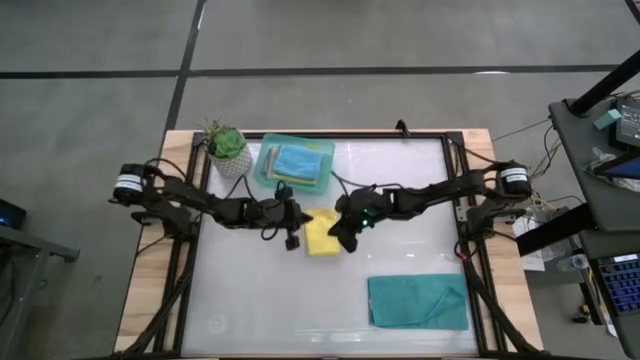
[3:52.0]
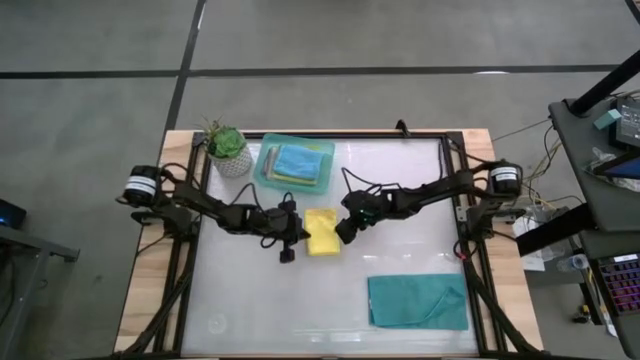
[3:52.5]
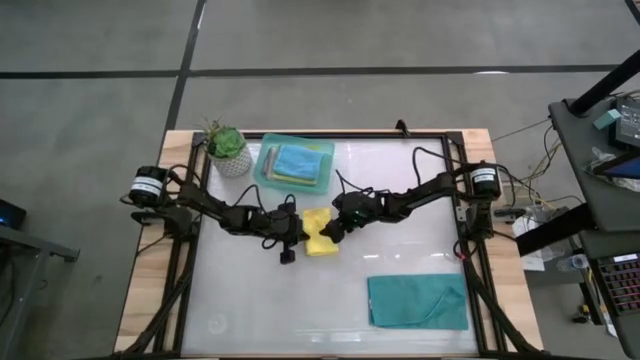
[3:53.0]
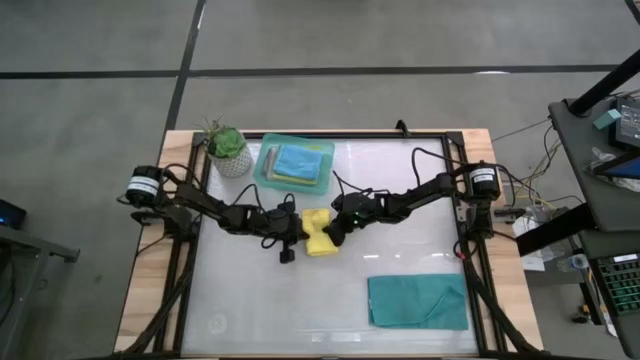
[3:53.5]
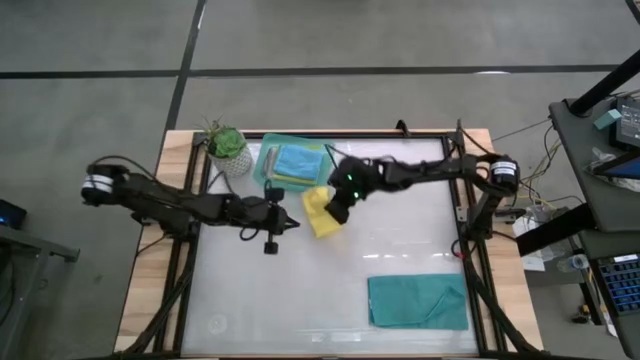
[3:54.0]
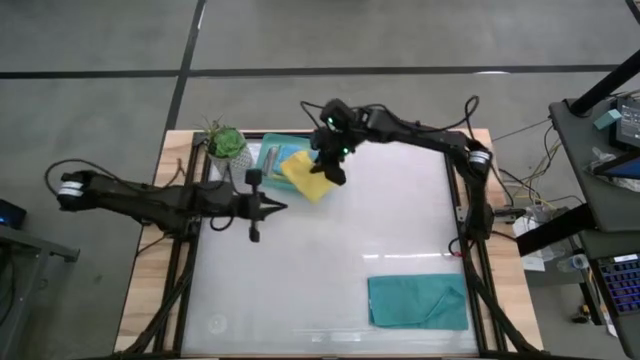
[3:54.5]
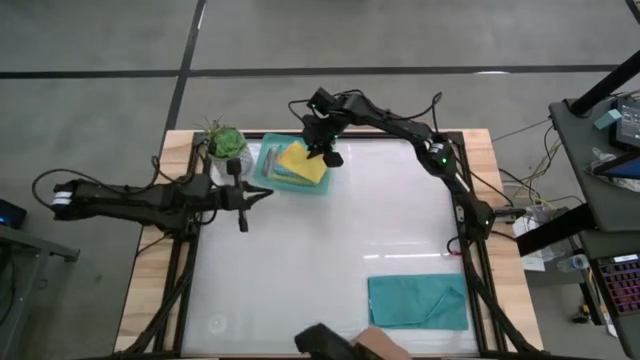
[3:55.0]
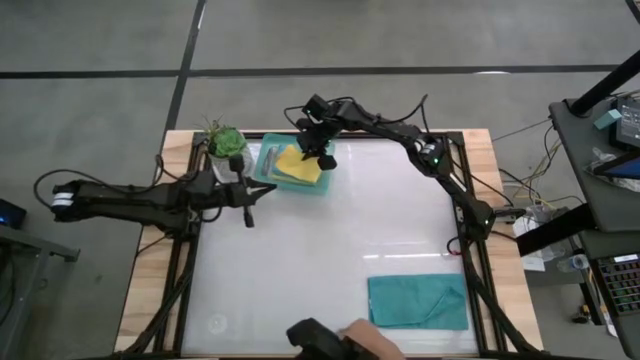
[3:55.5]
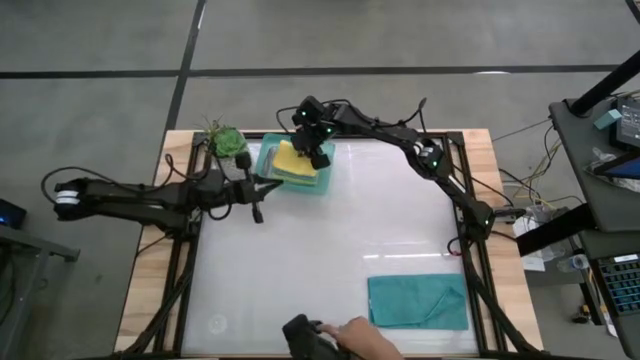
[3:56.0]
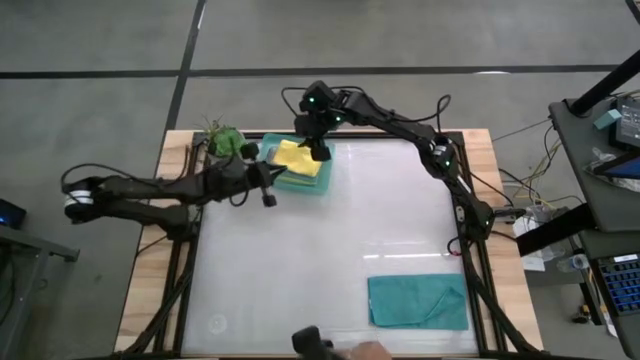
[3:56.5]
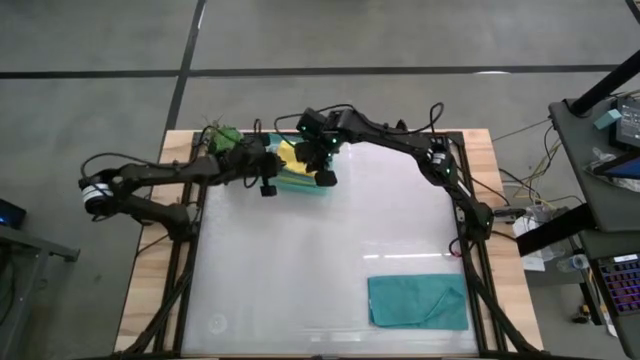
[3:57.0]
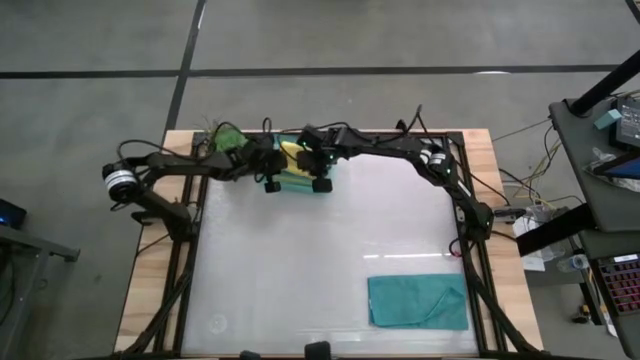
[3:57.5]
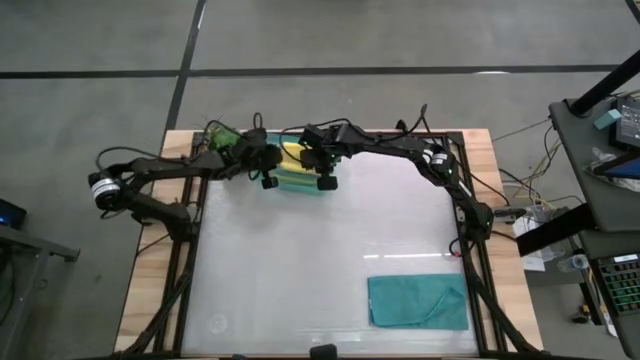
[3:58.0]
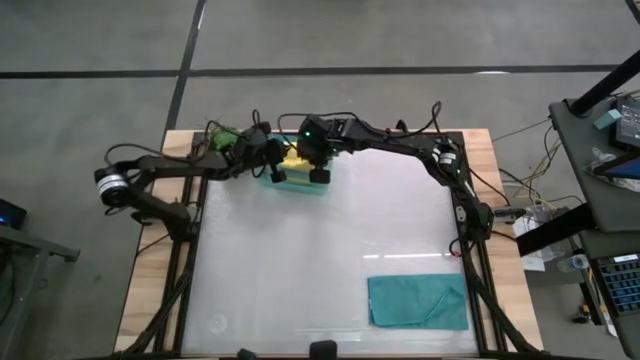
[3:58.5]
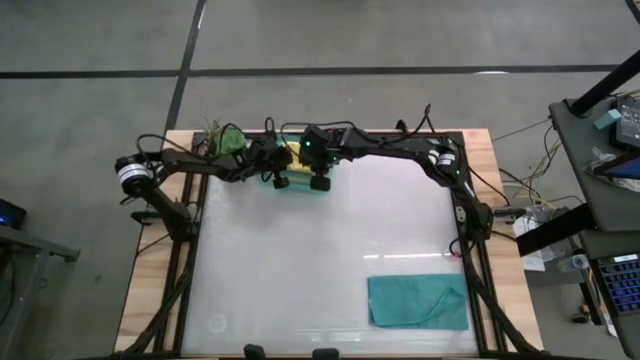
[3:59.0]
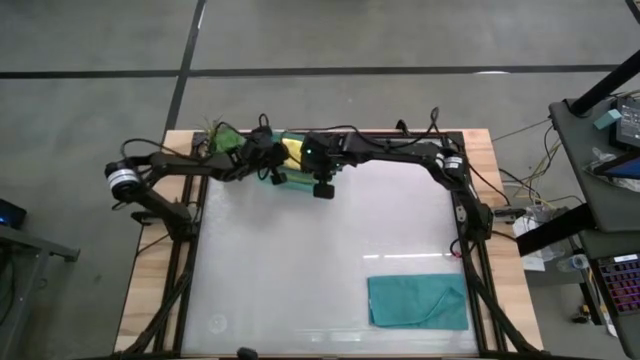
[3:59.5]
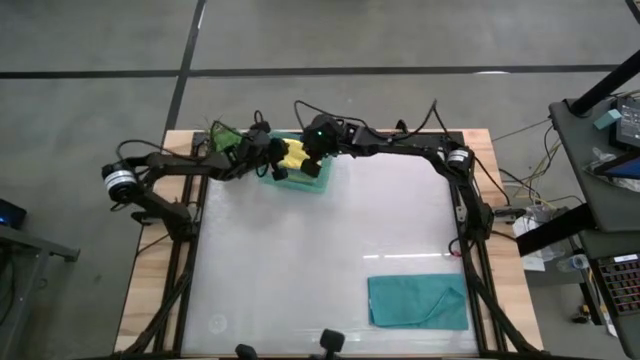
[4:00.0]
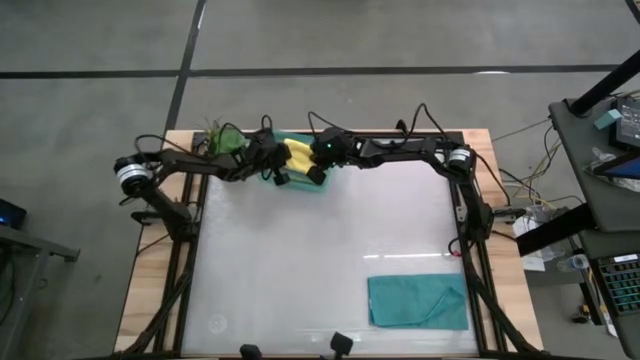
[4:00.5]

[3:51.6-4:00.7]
Task: Fold microfiber towels
Put the yellow microfiber towel into the bin

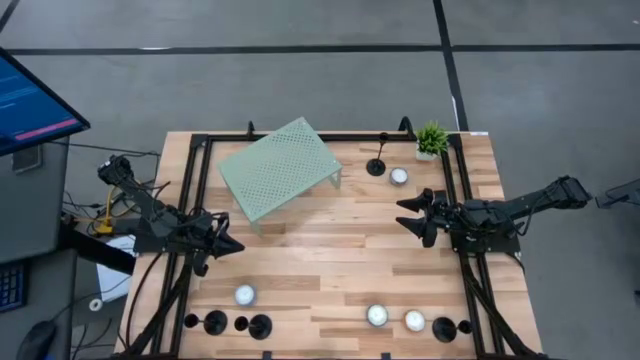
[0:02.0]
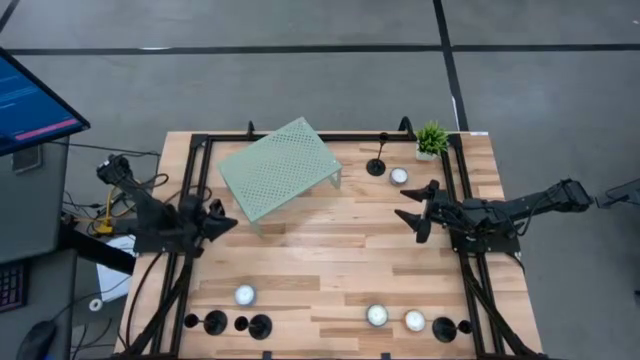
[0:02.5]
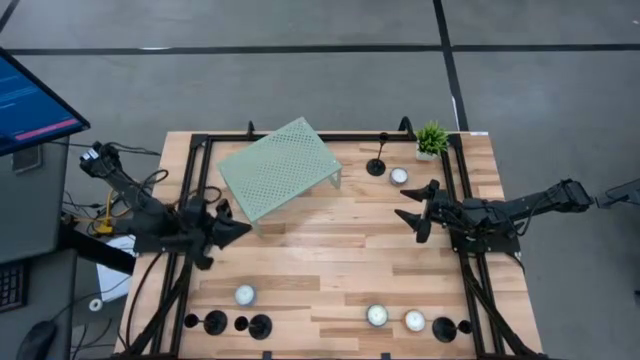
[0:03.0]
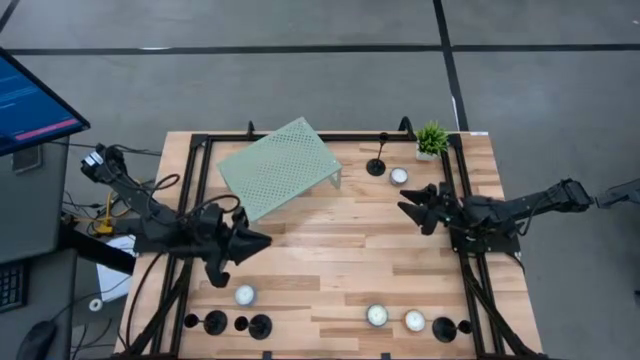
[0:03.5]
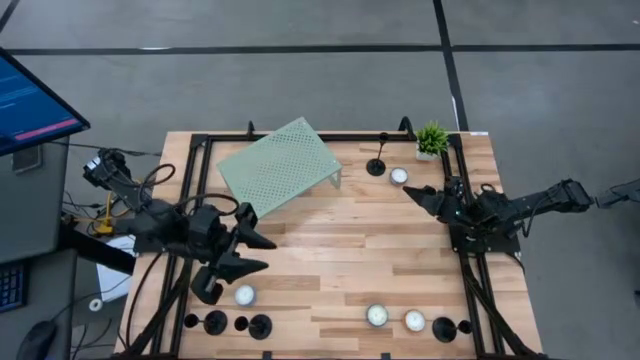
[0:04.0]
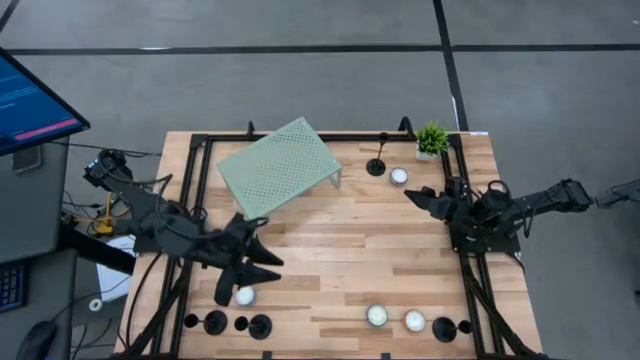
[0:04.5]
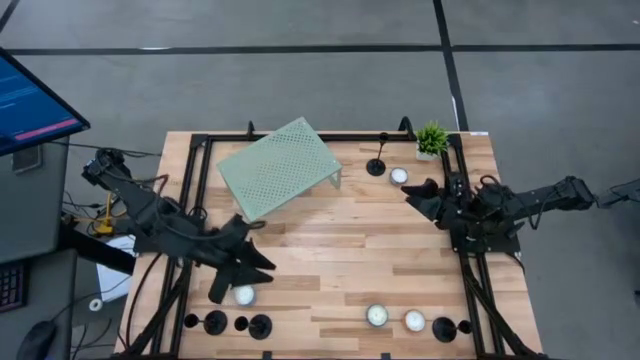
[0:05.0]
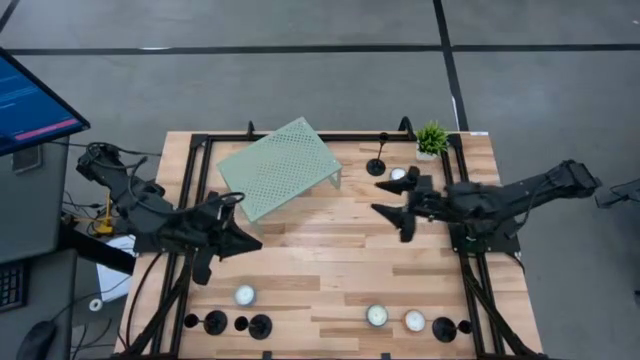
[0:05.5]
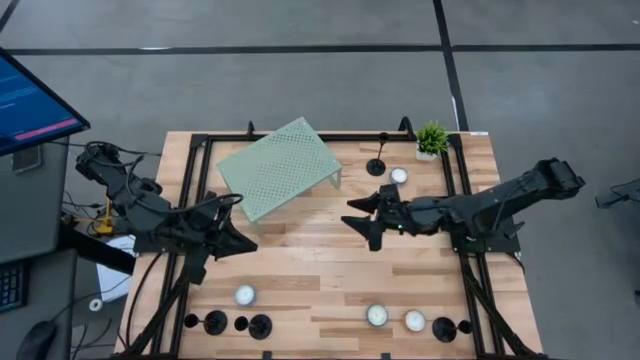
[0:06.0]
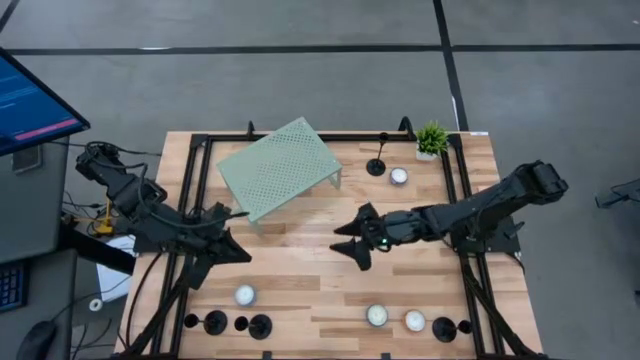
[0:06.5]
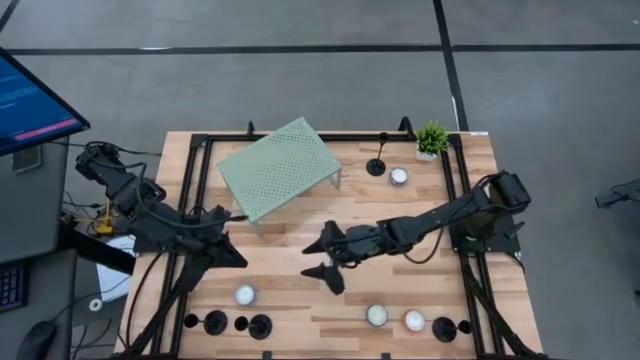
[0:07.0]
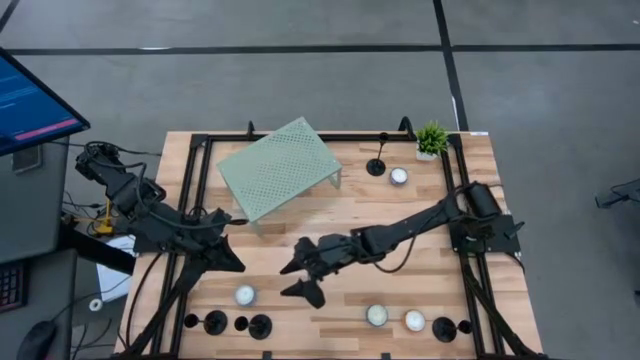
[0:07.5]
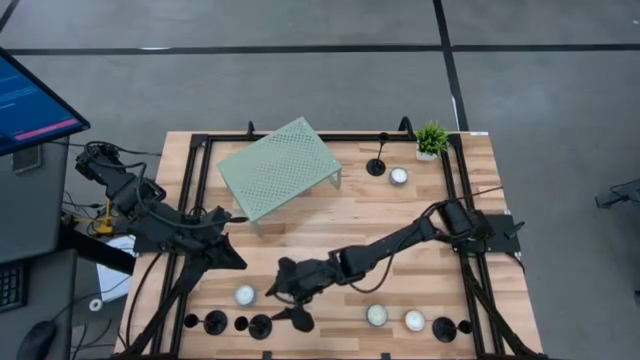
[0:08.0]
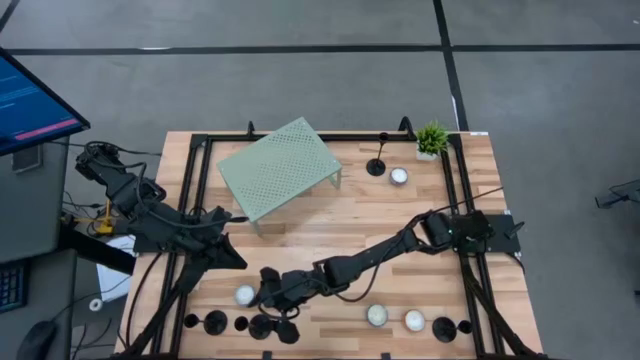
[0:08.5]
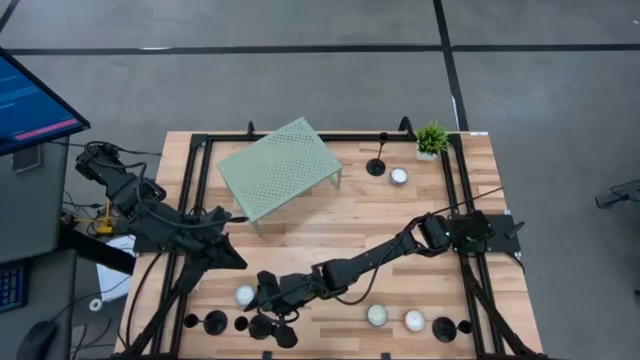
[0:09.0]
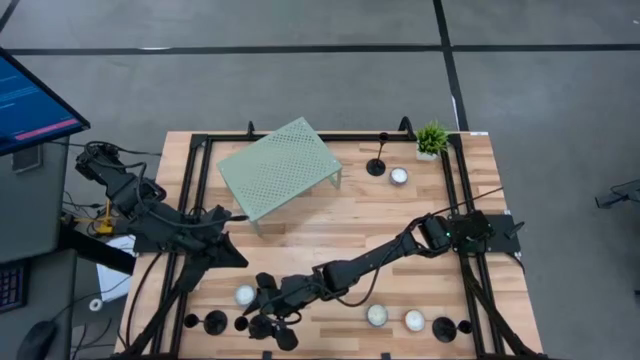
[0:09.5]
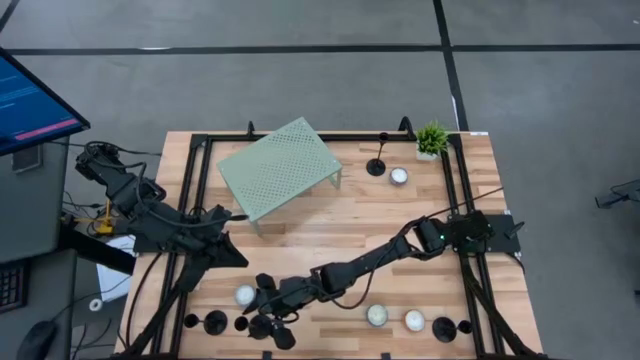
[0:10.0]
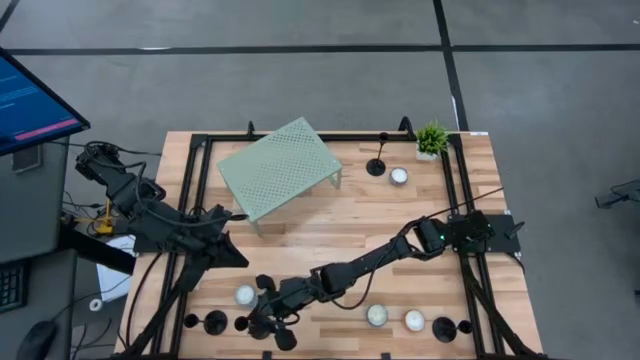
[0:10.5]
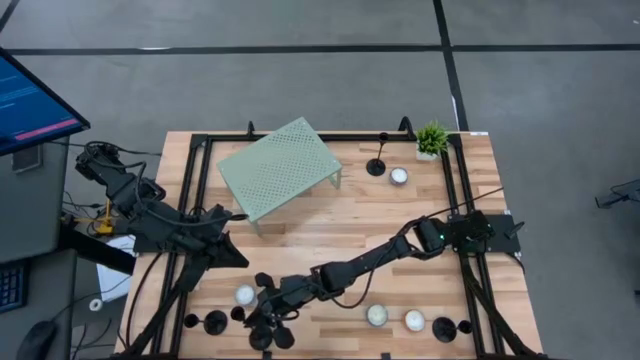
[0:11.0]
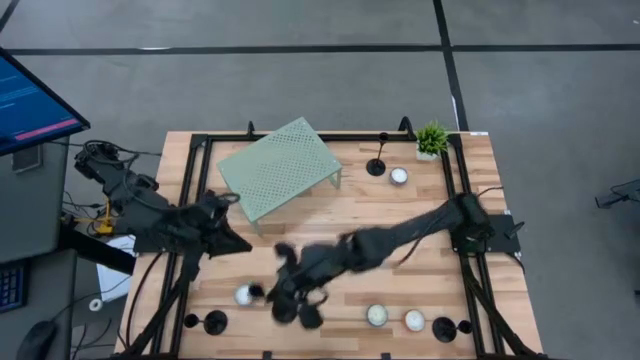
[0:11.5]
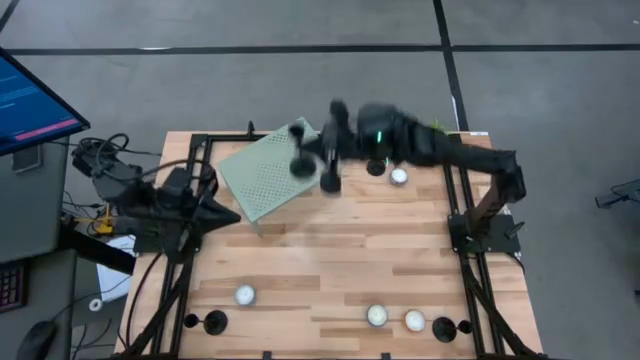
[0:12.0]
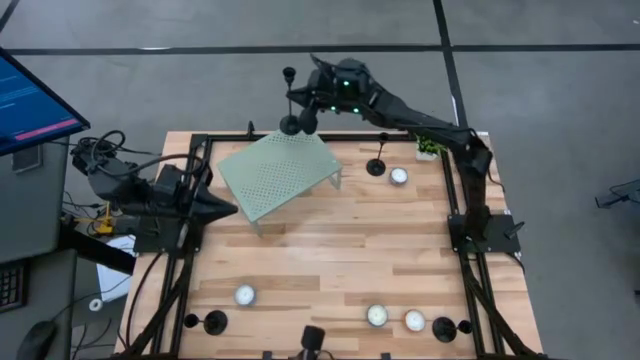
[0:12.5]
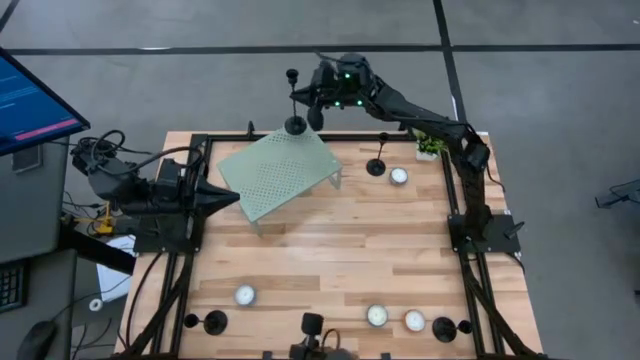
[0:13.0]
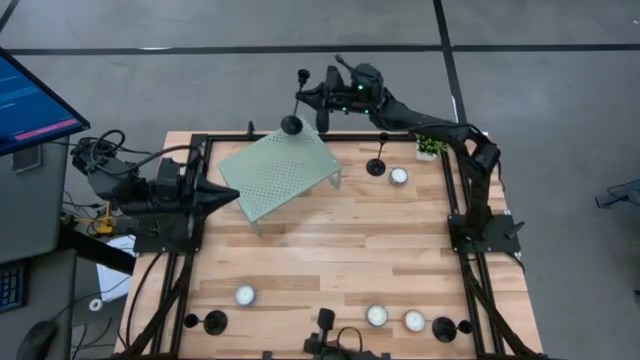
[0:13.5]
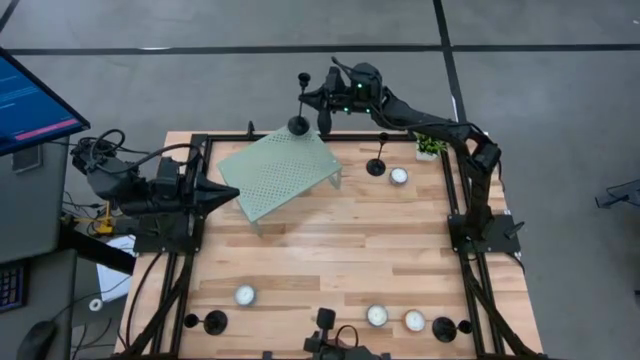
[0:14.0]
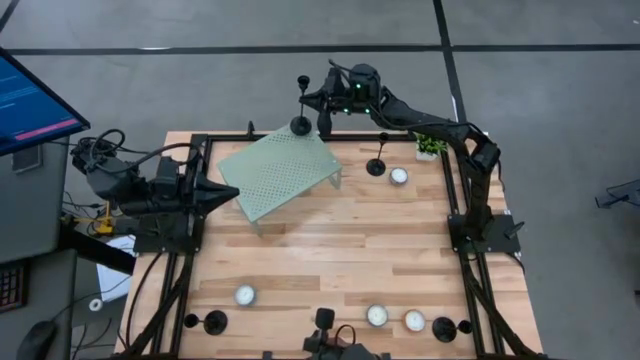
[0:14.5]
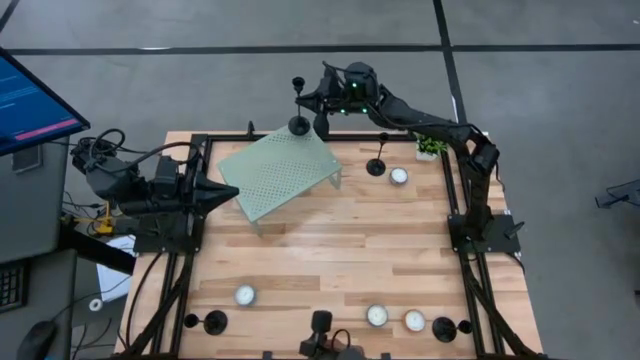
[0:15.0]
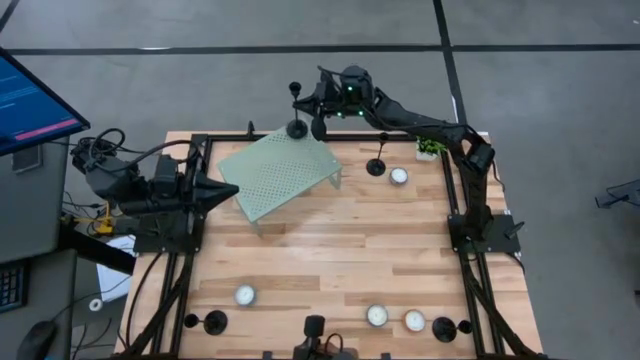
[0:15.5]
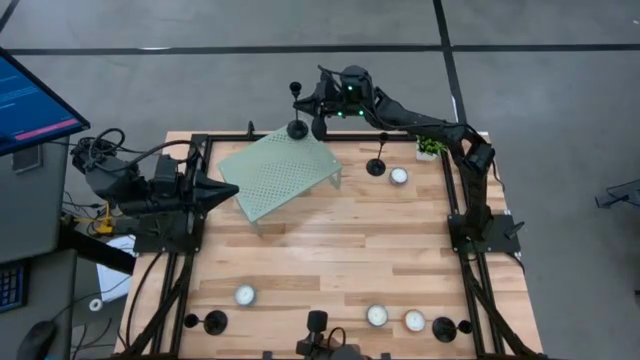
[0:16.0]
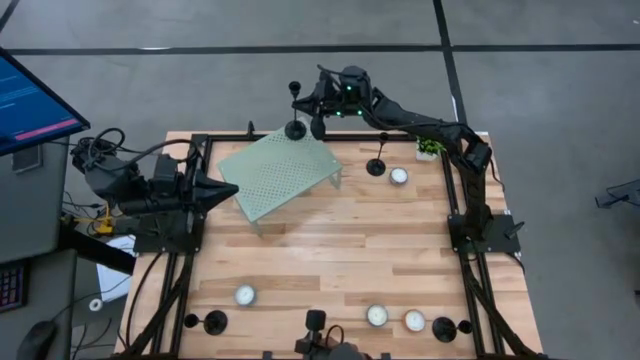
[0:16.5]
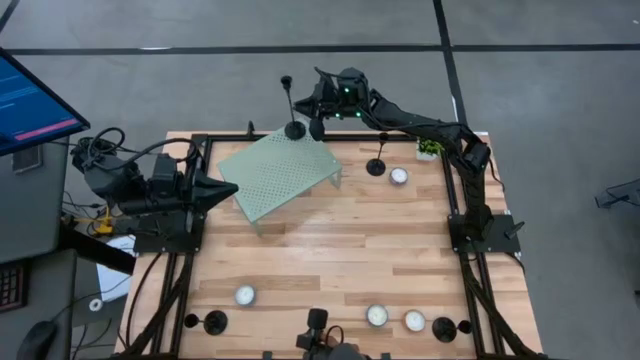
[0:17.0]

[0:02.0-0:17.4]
Task: Pick & Place candle stick holders
Put the black candle holder on the shelf
